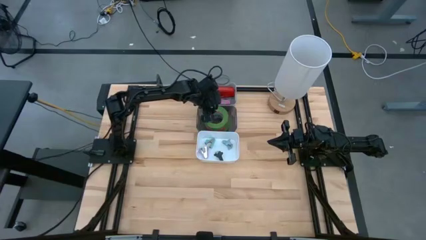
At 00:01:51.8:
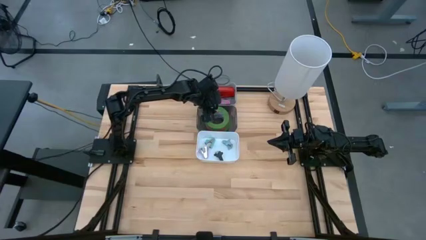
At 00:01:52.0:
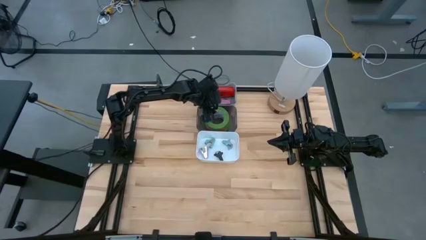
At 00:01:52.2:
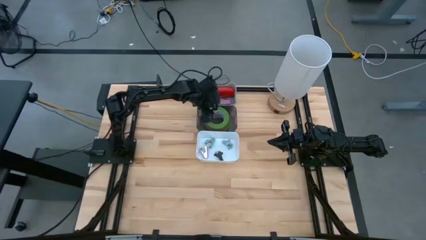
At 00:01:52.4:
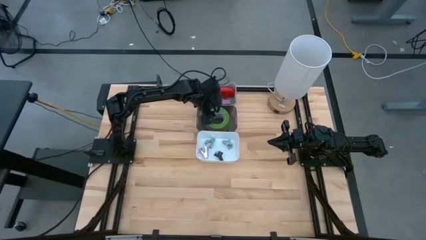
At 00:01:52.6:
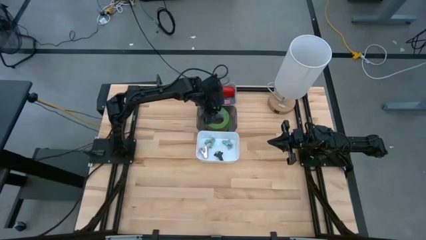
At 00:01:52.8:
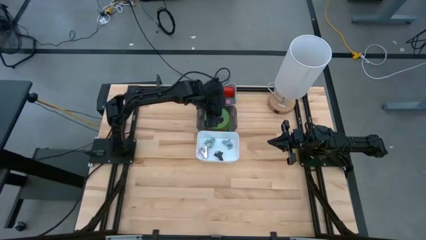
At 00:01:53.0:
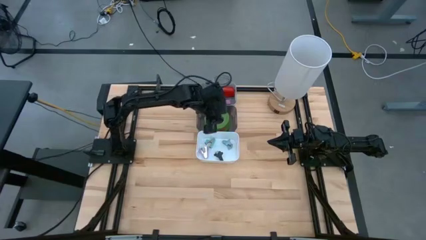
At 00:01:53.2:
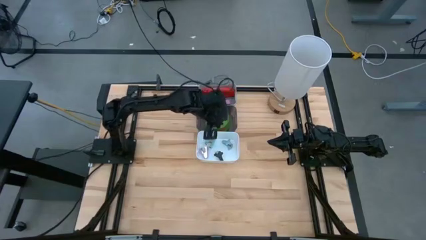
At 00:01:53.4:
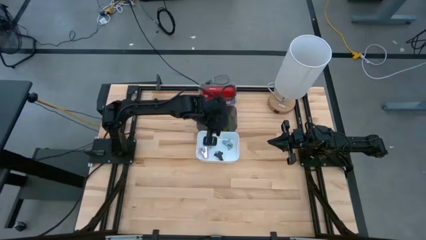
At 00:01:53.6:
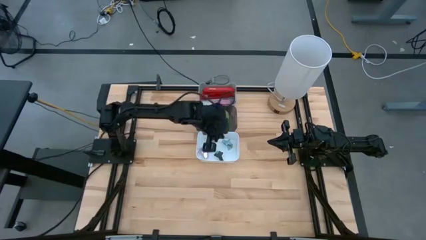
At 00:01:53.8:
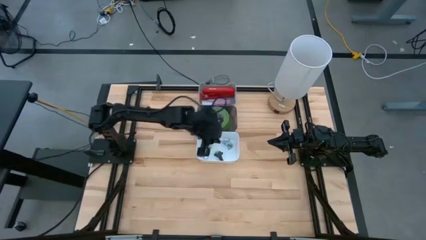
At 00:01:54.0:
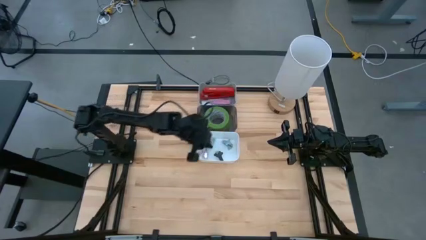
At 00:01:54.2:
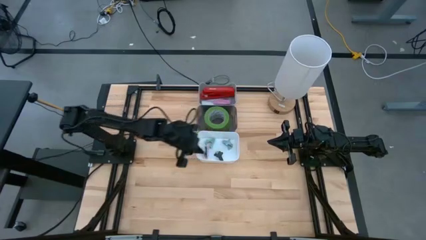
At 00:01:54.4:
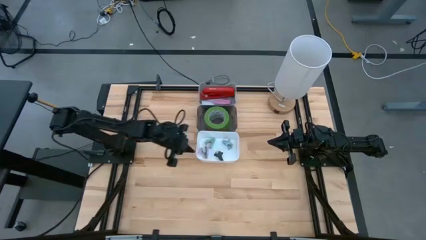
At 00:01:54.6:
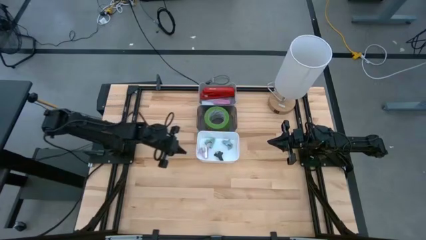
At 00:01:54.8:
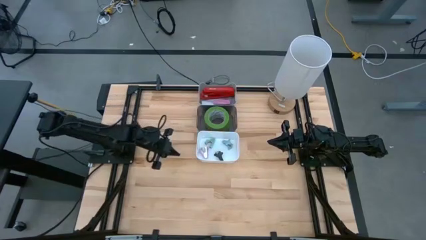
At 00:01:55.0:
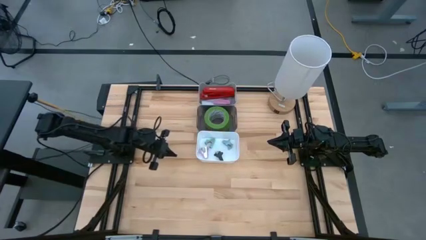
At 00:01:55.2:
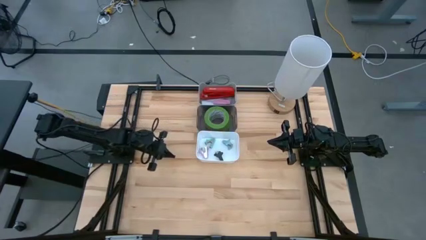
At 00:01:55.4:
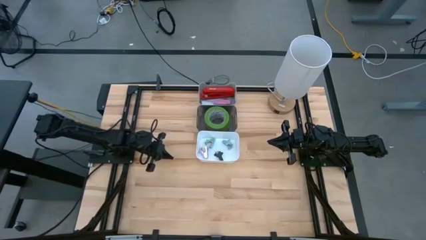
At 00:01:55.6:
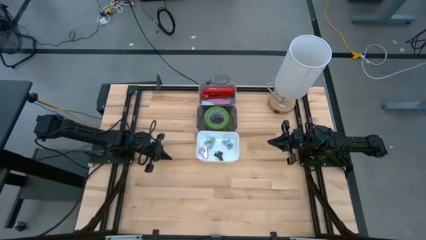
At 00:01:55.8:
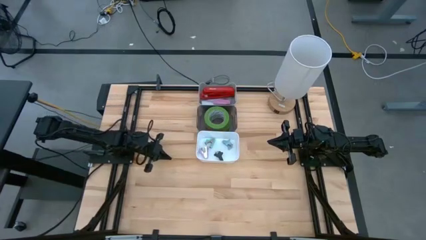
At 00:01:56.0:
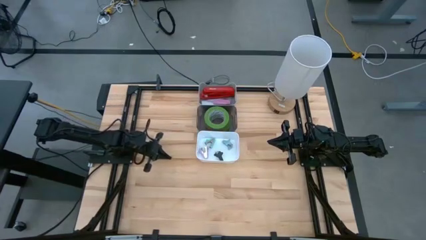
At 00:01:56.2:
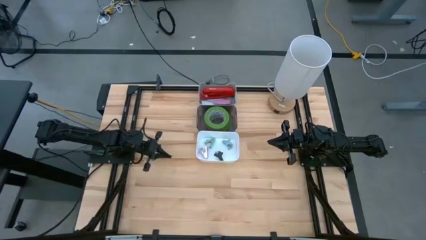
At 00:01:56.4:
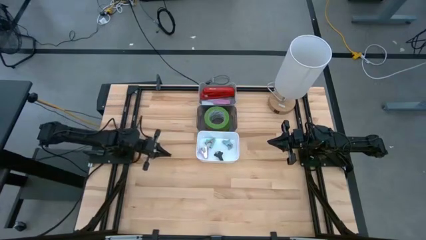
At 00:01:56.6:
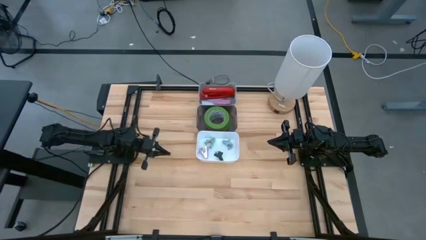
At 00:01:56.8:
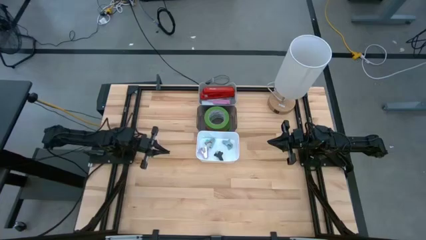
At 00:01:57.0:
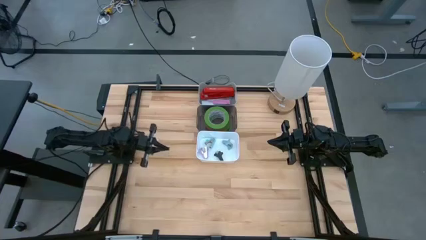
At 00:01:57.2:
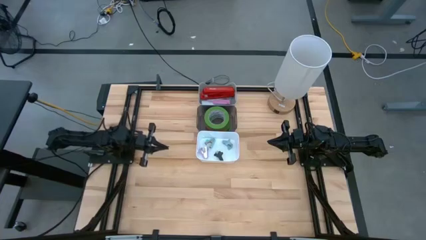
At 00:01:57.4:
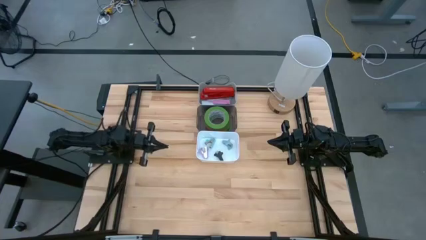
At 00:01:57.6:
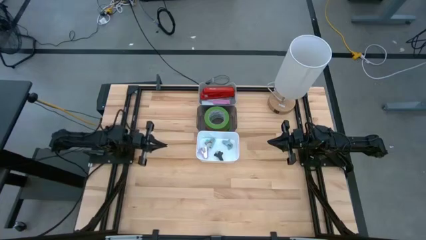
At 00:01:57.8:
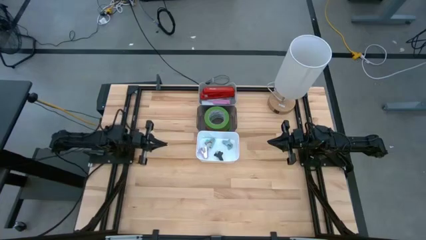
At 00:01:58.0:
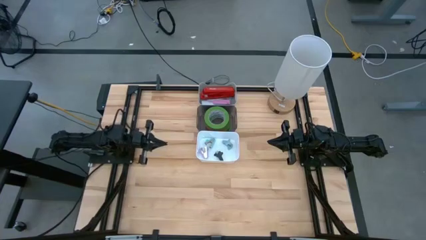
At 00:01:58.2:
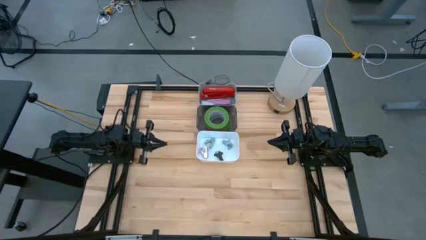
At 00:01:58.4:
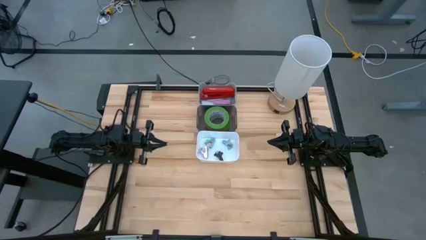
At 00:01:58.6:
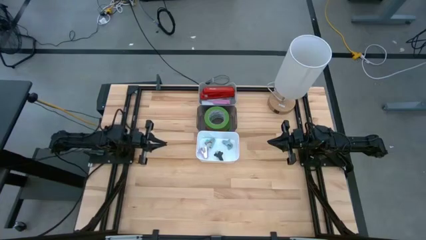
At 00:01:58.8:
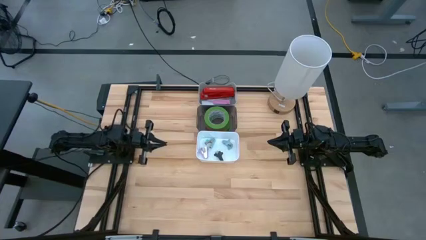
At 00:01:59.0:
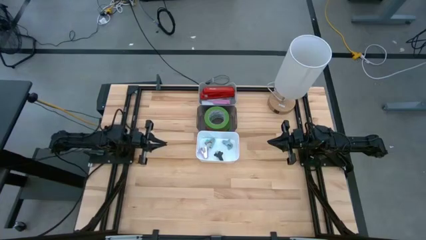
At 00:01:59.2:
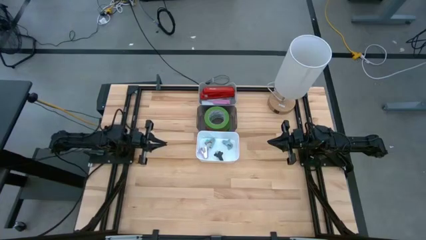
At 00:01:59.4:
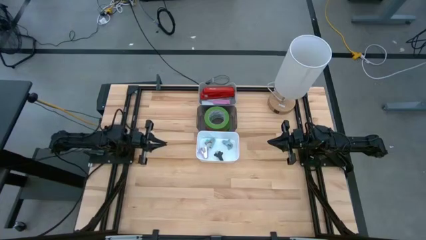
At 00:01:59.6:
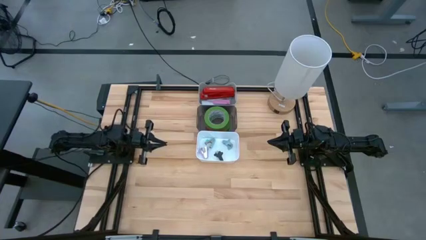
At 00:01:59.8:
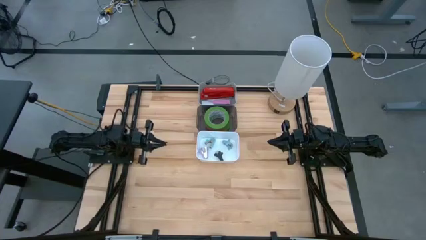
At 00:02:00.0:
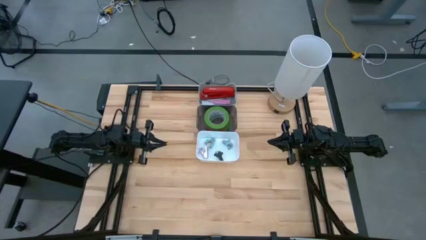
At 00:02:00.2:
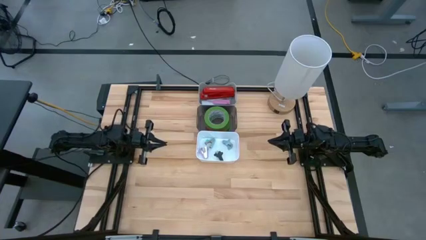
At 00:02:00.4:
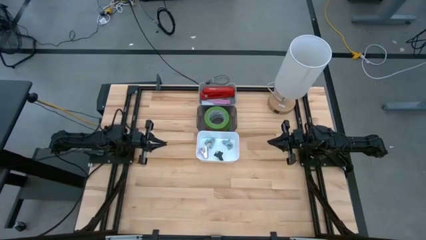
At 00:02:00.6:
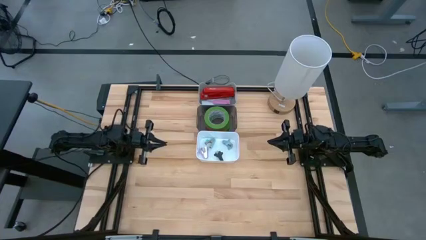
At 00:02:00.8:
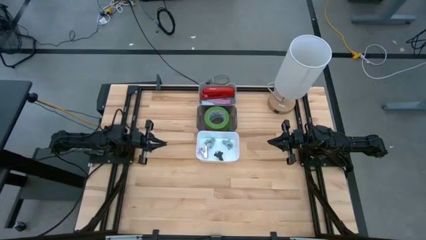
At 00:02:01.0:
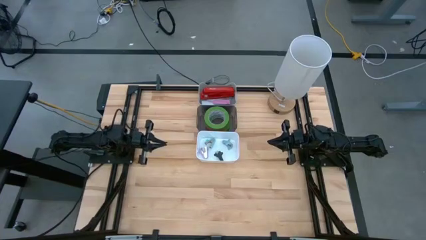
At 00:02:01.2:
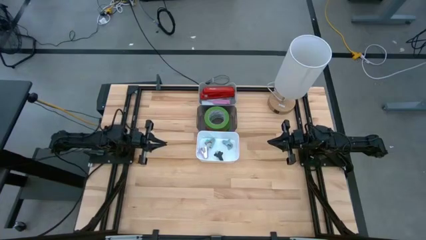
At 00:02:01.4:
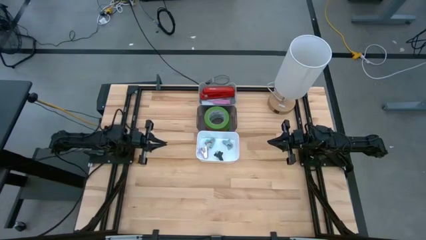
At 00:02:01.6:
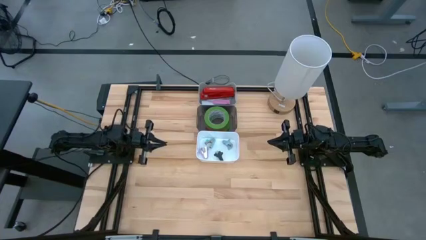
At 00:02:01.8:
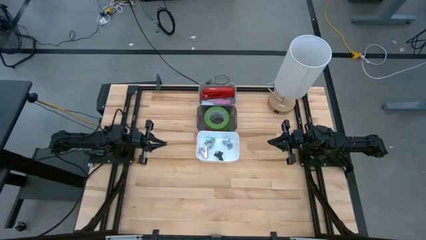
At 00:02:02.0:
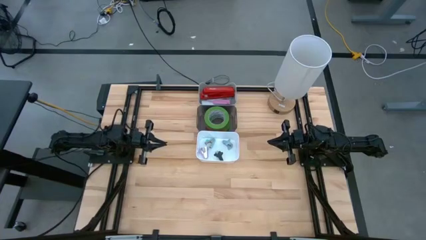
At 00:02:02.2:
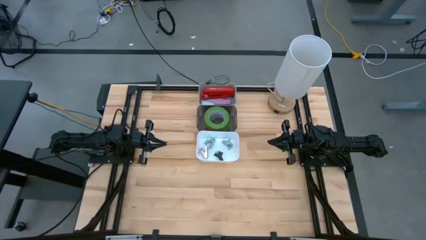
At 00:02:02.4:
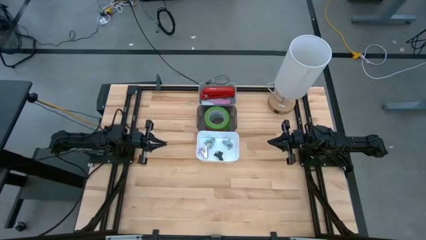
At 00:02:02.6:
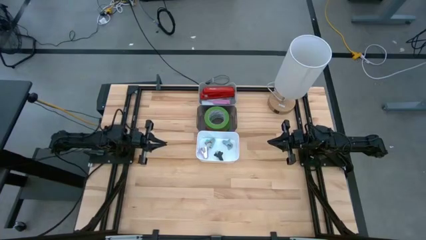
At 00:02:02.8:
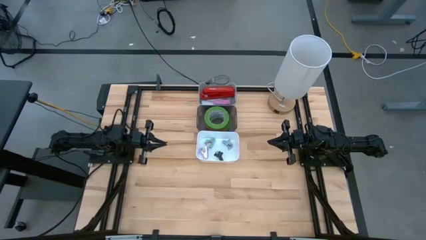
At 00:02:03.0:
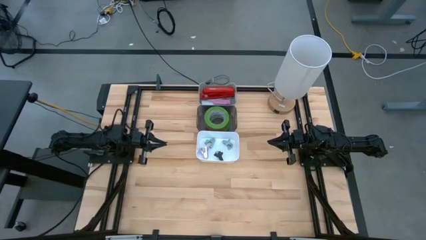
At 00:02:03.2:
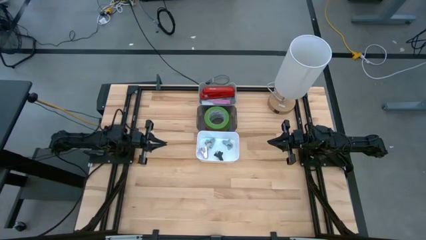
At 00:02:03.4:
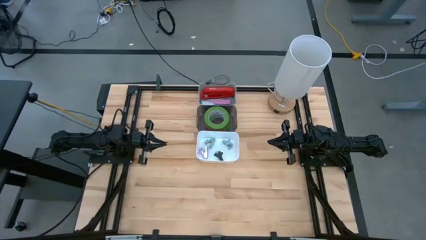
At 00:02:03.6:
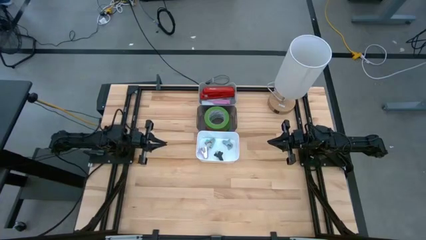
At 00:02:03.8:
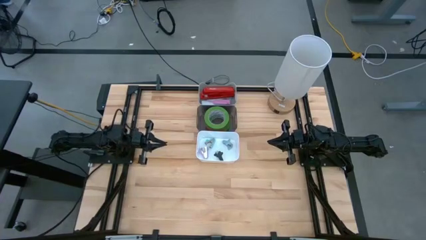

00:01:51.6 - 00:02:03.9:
Task: Pick and place Stapler, Stapler remover, tape
Return to Home Position
